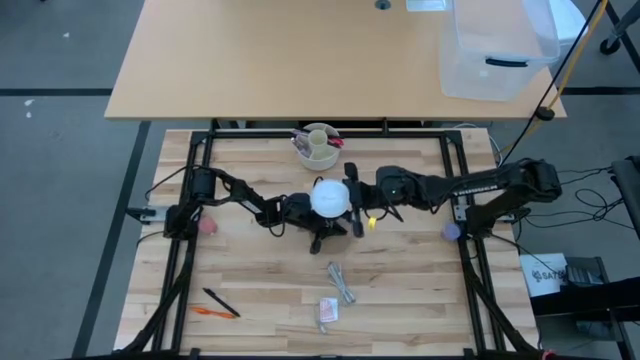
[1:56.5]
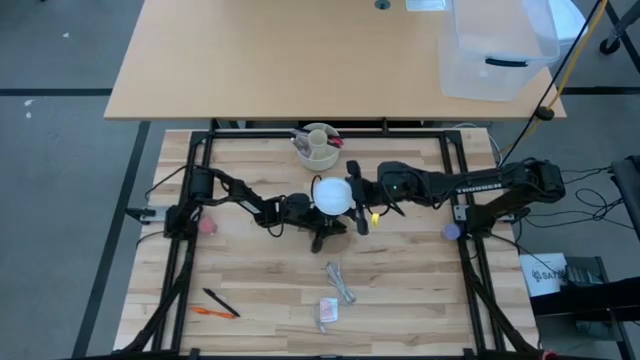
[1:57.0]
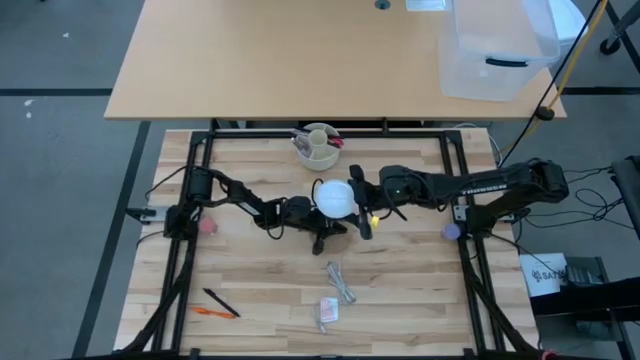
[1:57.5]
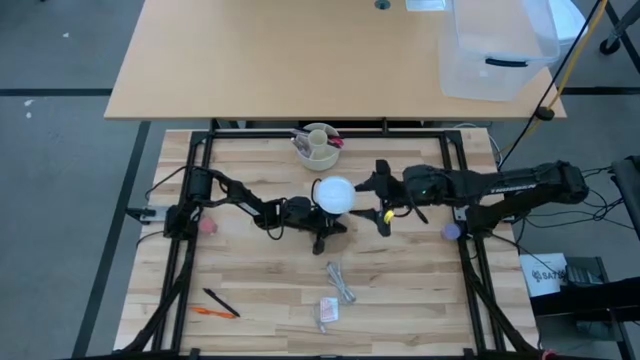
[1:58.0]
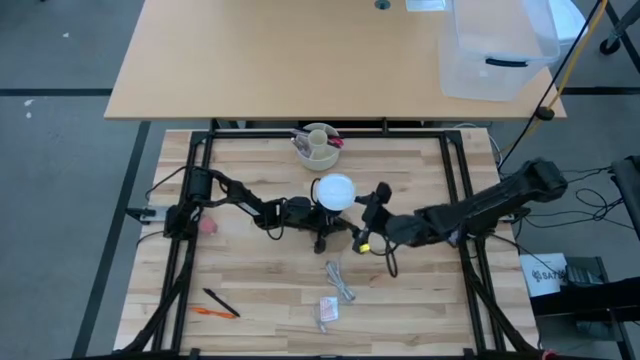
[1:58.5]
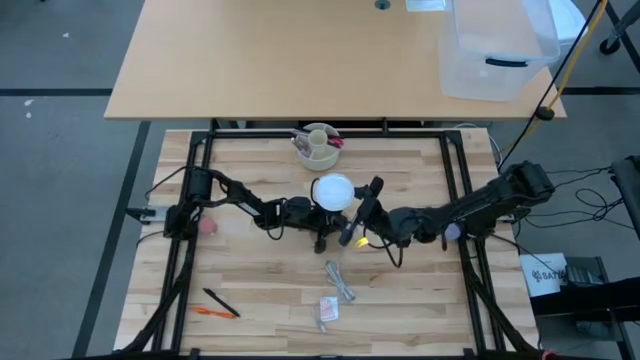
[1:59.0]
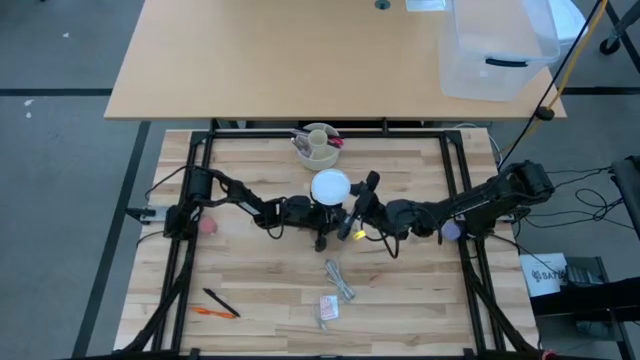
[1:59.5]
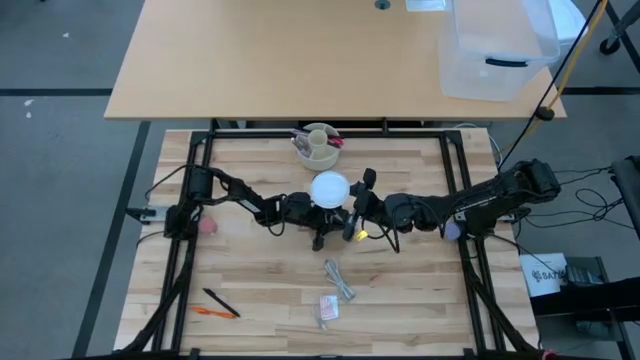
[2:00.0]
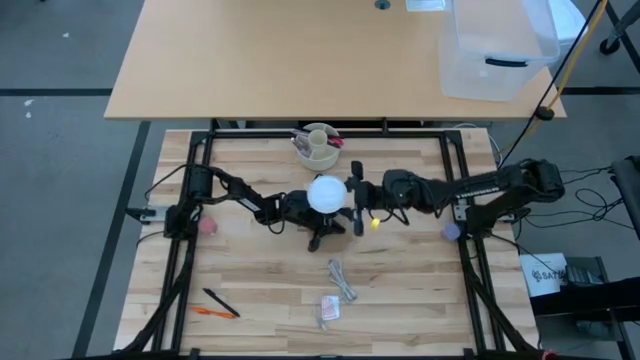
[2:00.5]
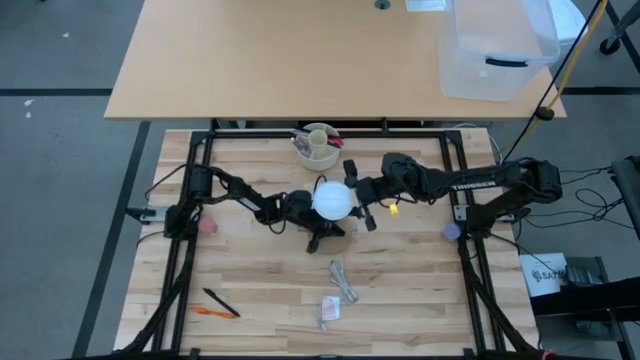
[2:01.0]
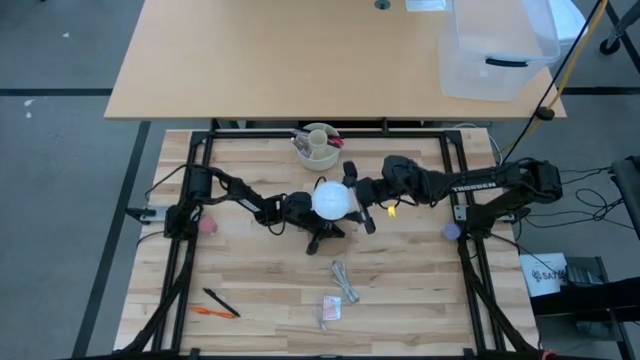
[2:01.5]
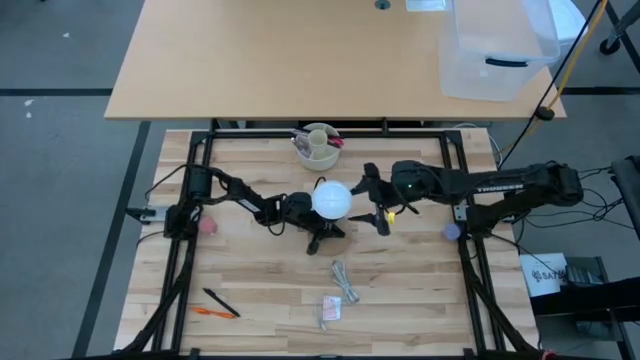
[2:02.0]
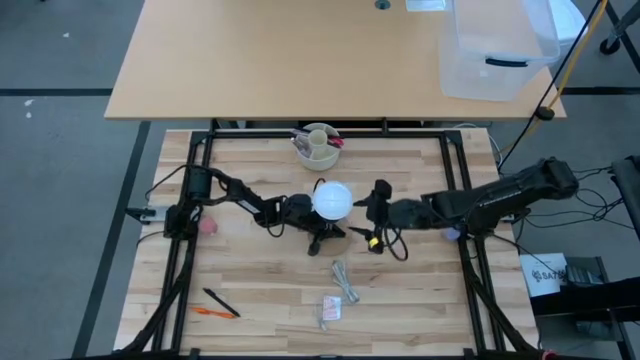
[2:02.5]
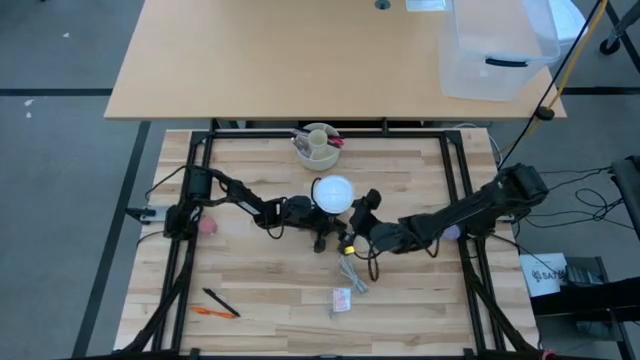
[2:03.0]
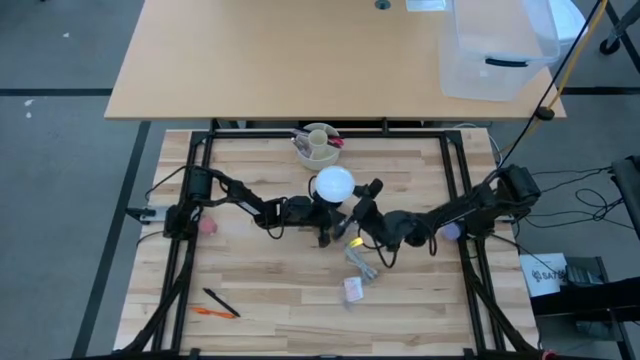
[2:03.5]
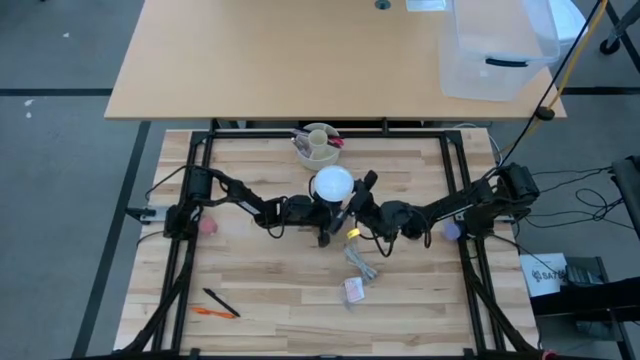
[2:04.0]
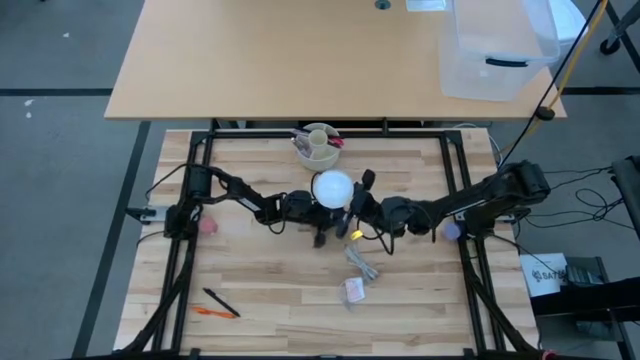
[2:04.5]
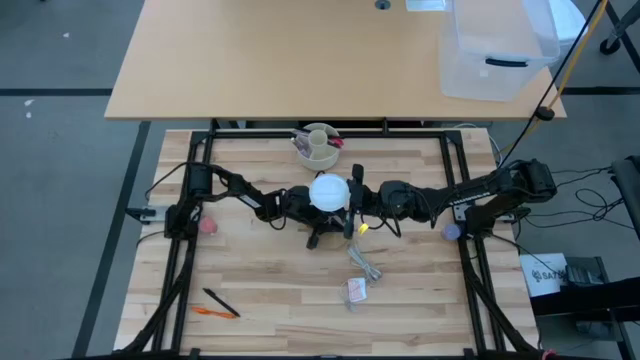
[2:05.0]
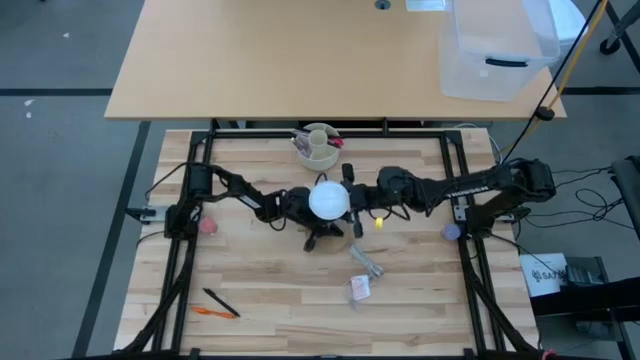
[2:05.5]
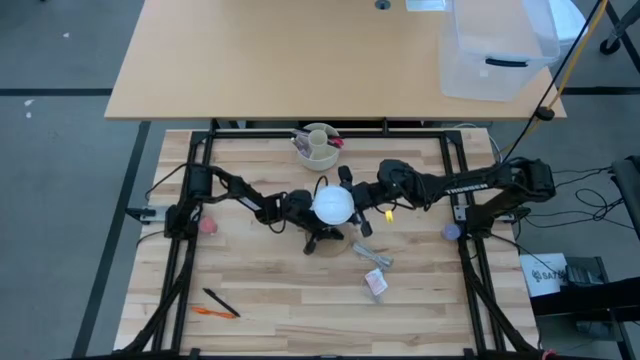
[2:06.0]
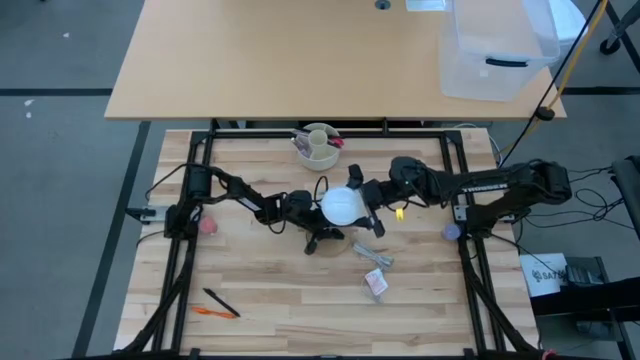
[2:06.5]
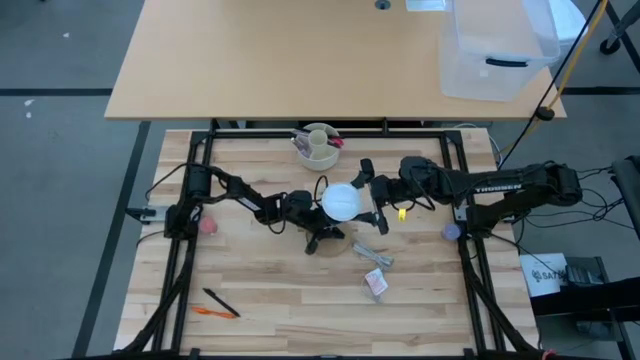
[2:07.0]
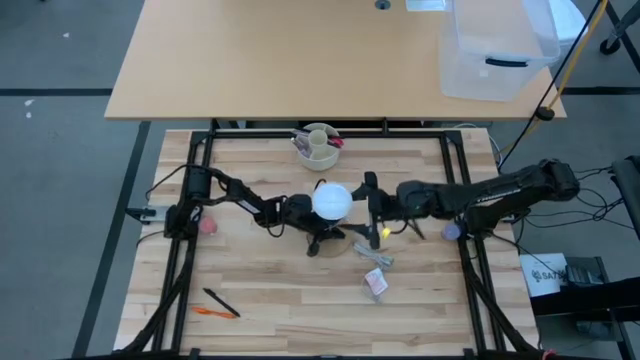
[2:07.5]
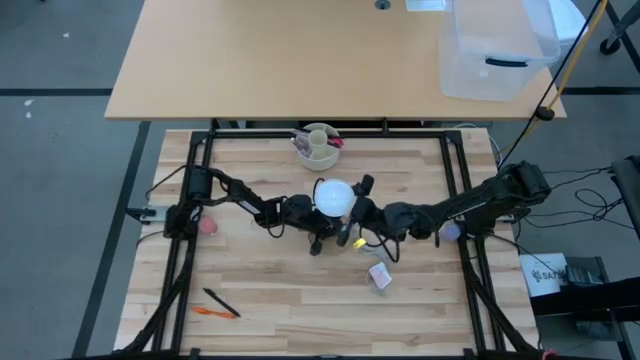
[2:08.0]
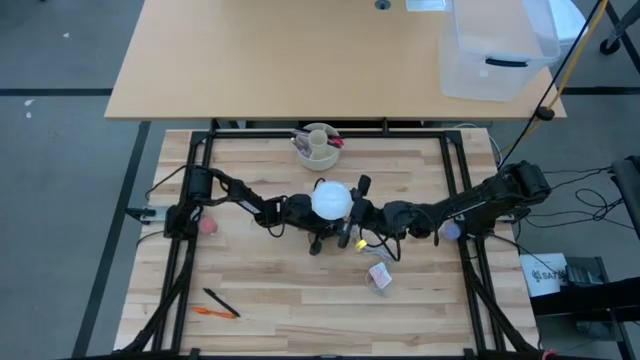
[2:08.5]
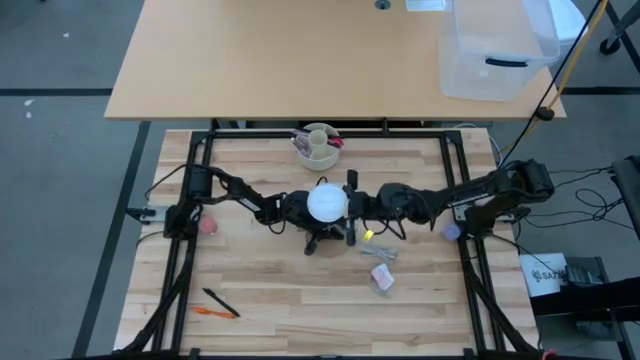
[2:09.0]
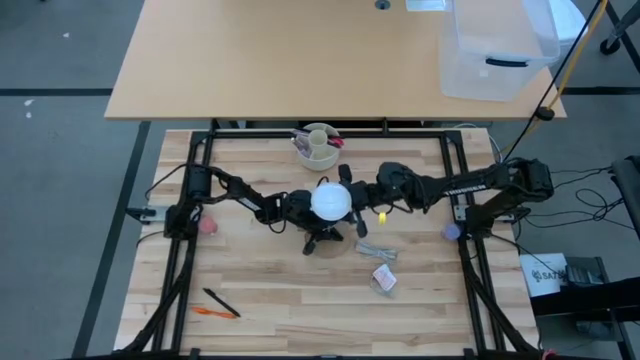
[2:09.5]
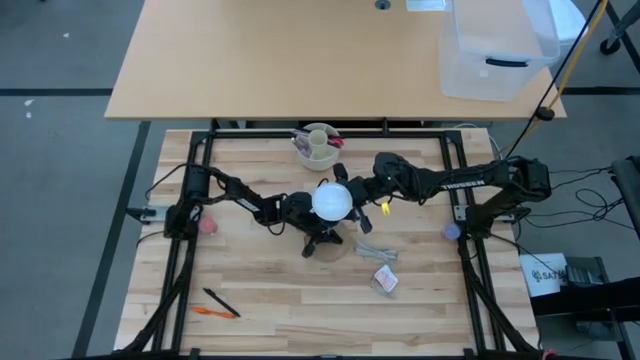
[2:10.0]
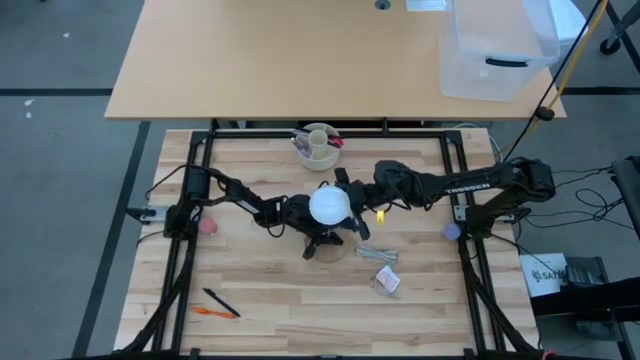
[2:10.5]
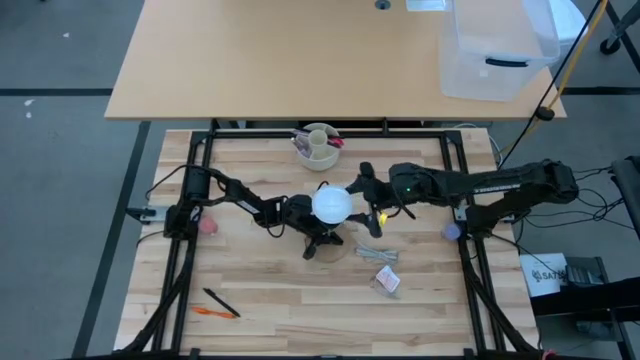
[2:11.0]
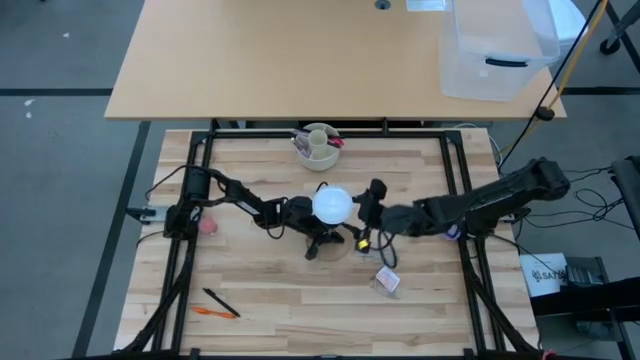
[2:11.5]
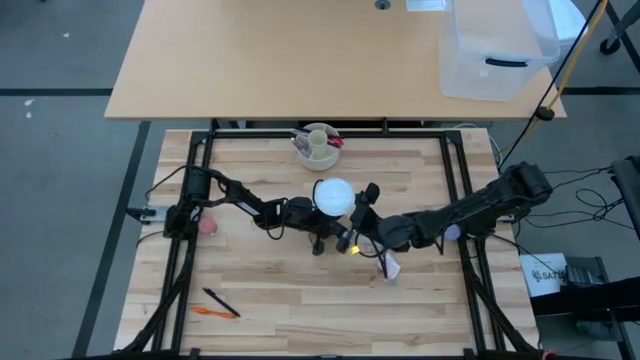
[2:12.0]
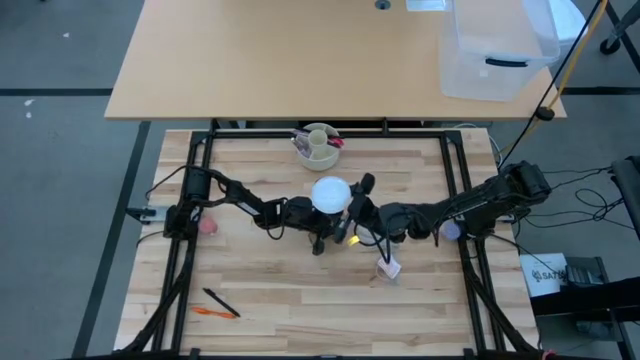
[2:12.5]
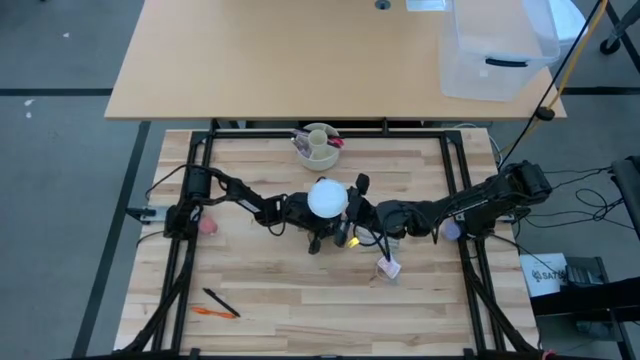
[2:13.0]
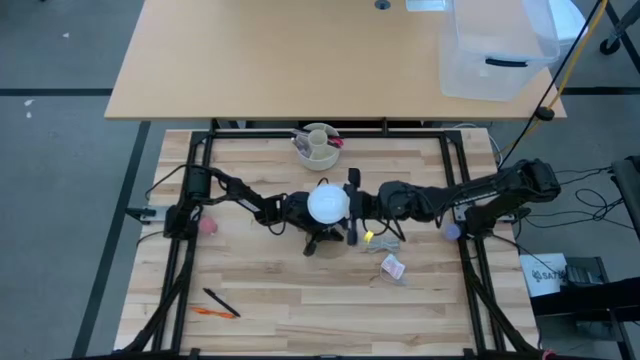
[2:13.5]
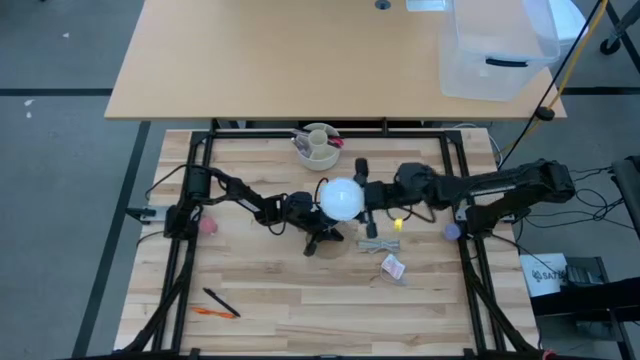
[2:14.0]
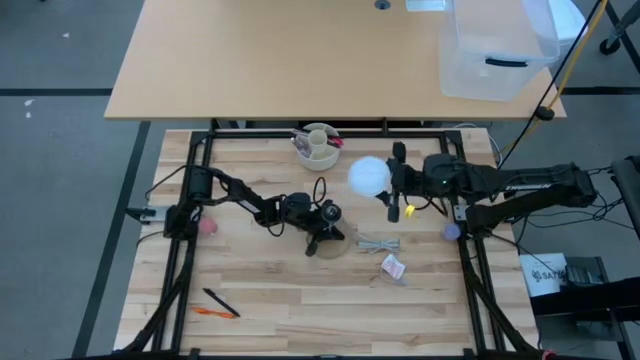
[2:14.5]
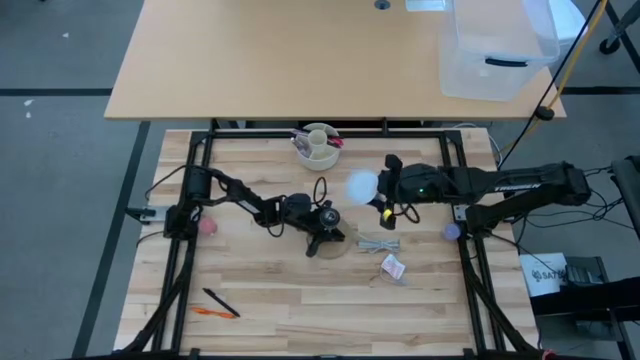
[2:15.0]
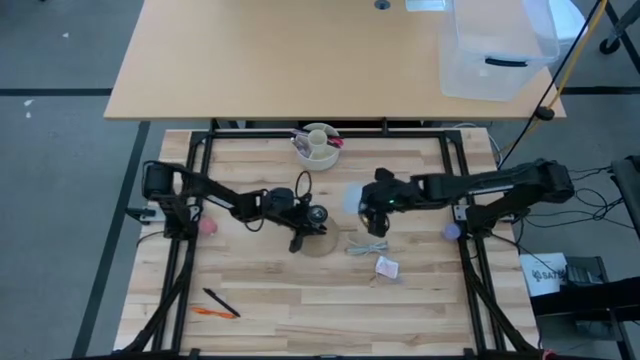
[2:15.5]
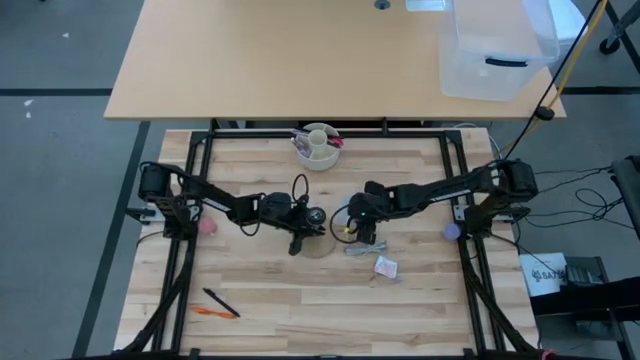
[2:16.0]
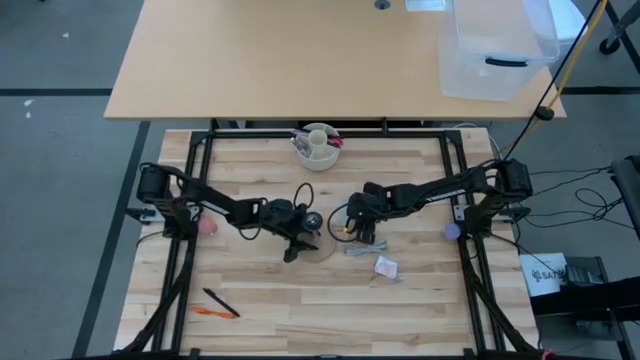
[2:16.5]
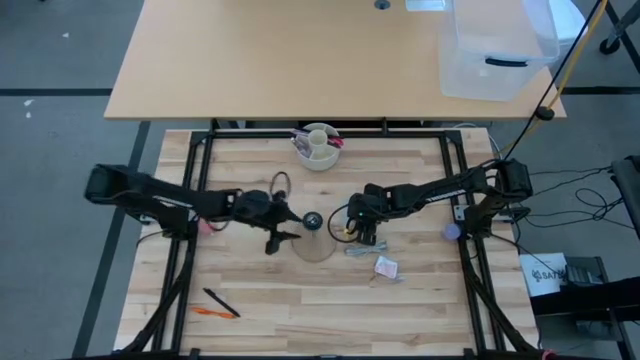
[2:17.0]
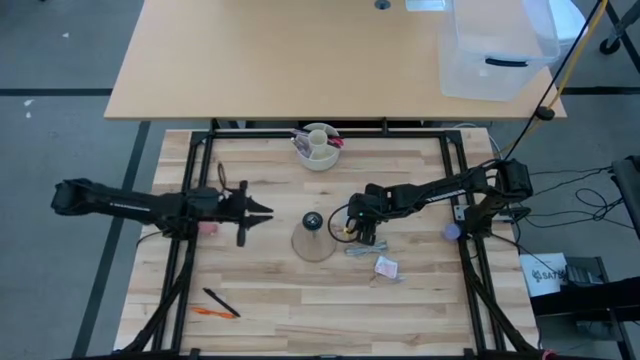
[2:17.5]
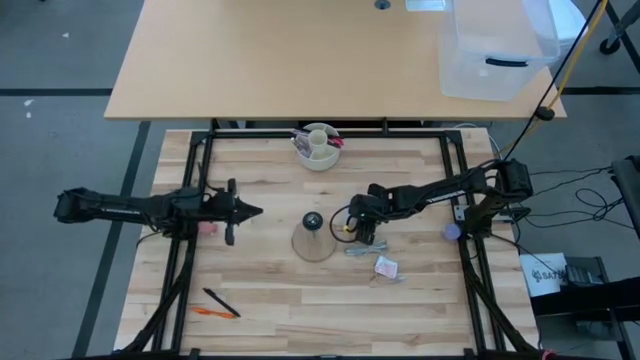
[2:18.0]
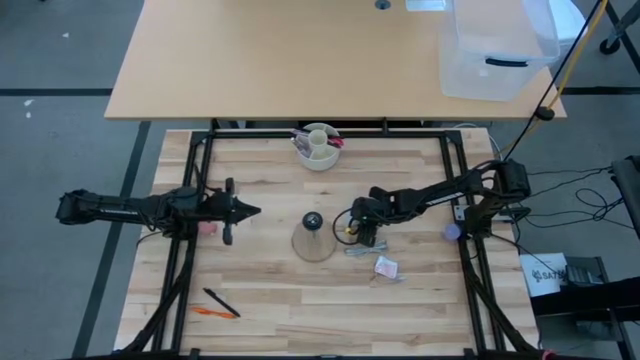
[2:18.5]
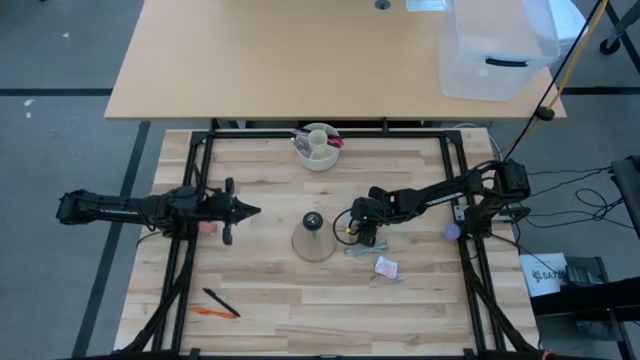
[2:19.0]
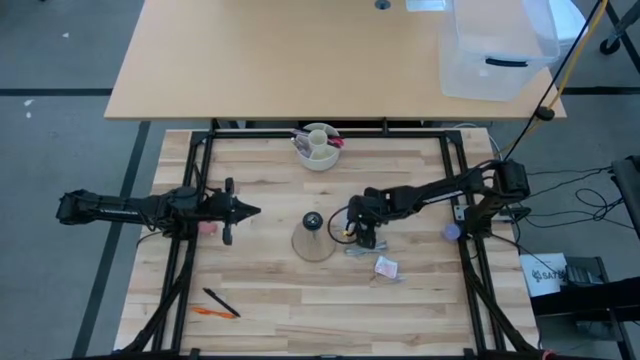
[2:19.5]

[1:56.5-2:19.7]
Task: Screw lightbulb
Remove the lightbulb from the wooden lamp
